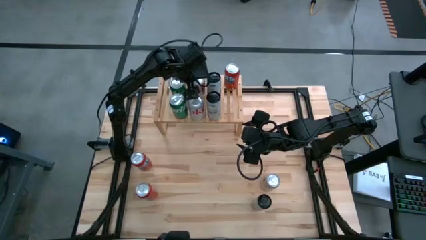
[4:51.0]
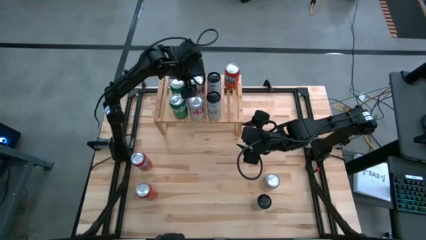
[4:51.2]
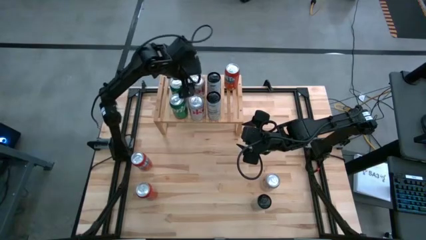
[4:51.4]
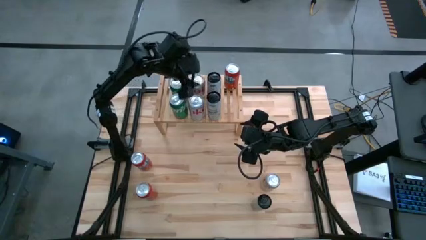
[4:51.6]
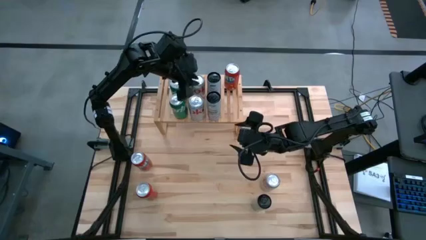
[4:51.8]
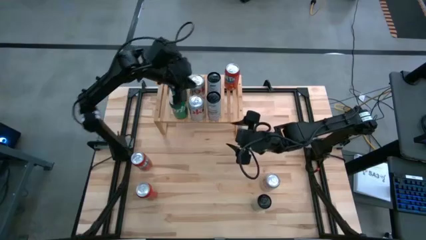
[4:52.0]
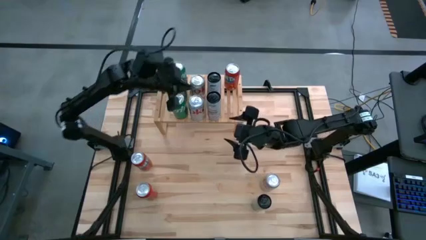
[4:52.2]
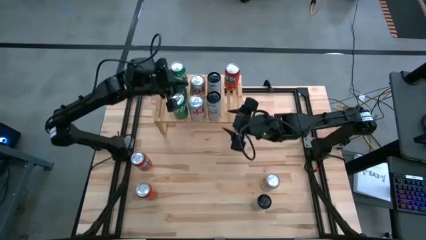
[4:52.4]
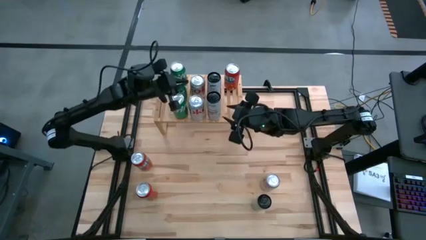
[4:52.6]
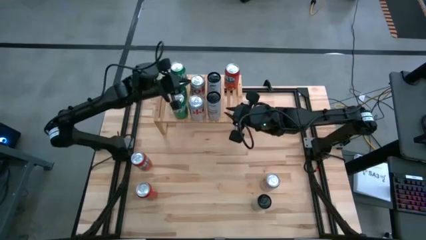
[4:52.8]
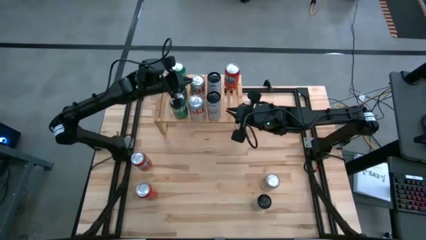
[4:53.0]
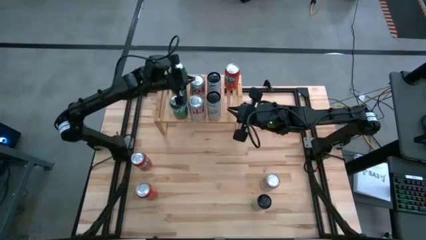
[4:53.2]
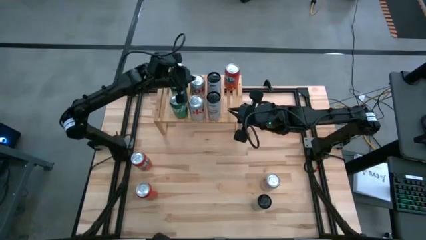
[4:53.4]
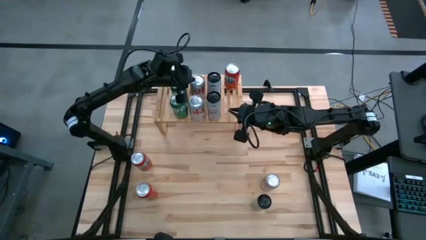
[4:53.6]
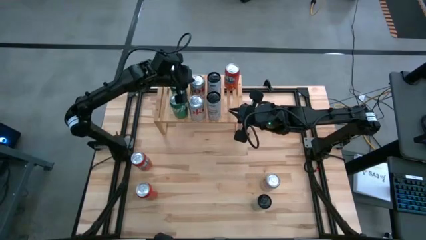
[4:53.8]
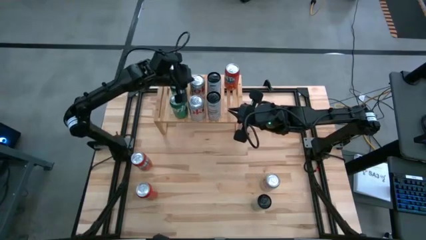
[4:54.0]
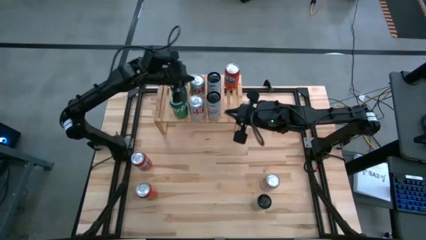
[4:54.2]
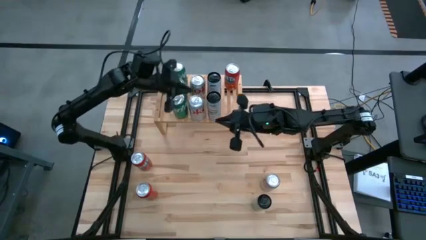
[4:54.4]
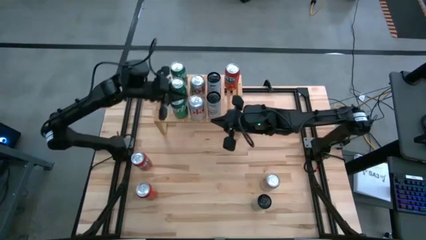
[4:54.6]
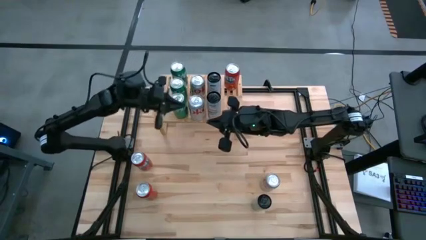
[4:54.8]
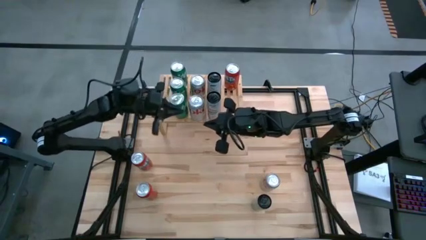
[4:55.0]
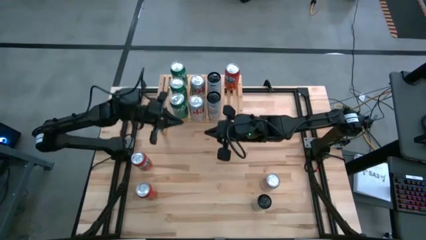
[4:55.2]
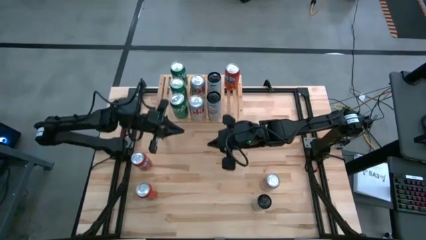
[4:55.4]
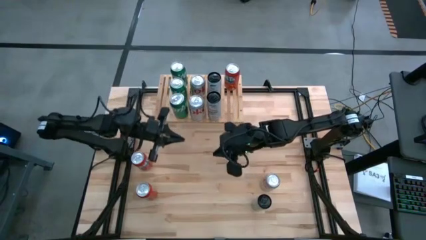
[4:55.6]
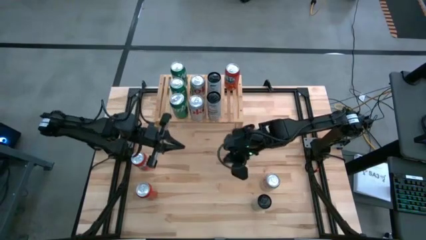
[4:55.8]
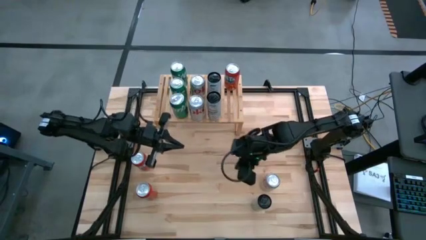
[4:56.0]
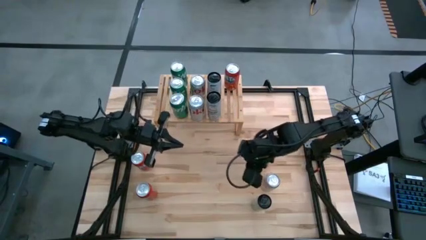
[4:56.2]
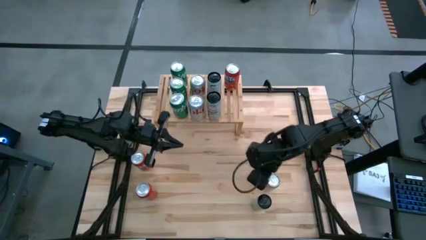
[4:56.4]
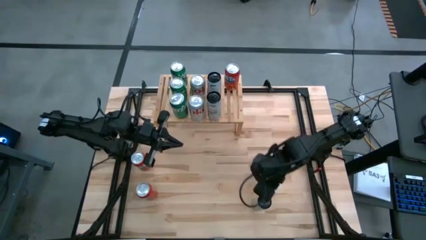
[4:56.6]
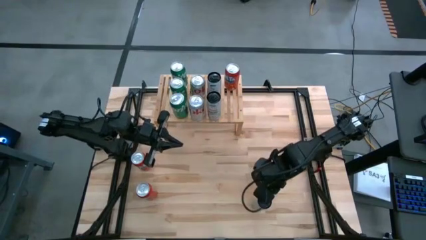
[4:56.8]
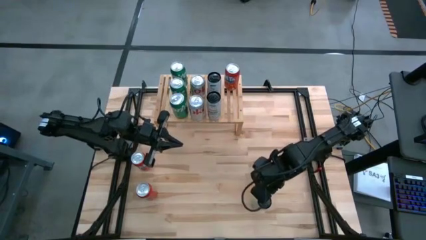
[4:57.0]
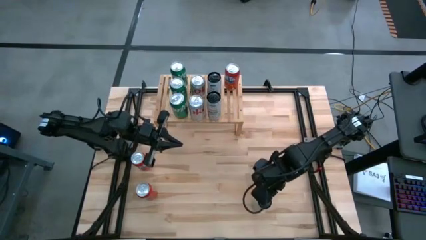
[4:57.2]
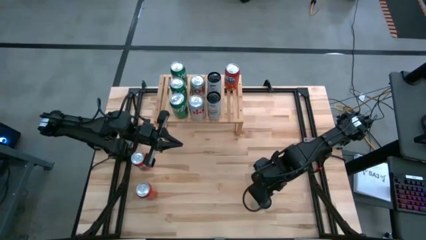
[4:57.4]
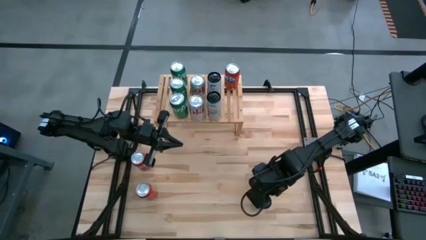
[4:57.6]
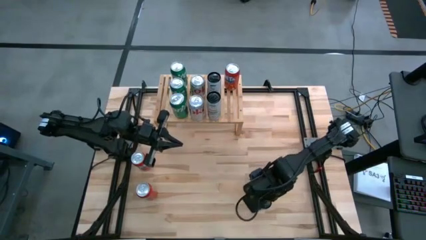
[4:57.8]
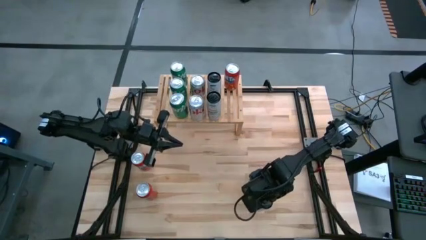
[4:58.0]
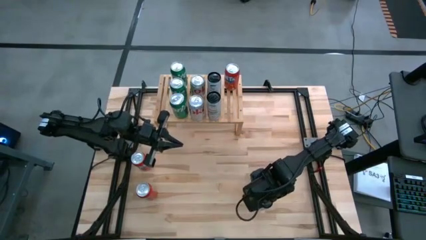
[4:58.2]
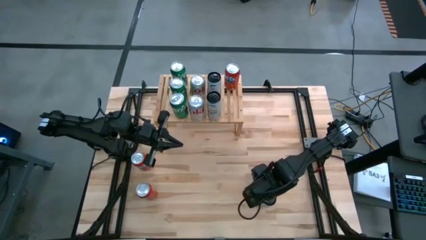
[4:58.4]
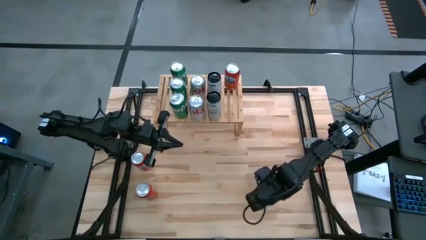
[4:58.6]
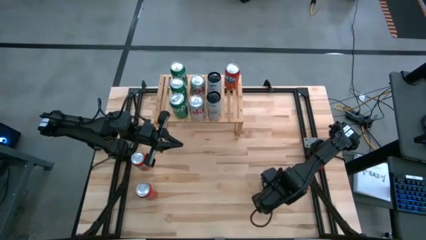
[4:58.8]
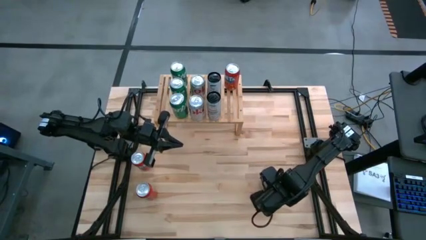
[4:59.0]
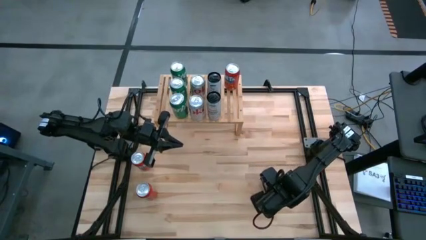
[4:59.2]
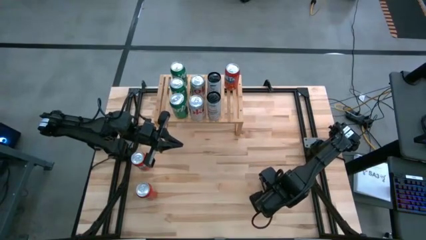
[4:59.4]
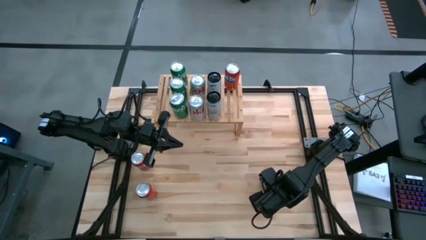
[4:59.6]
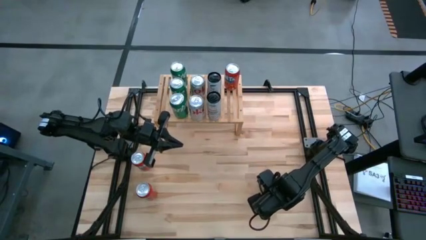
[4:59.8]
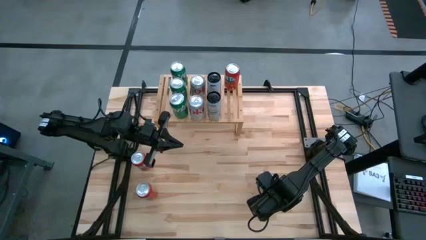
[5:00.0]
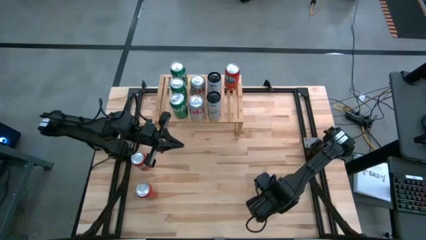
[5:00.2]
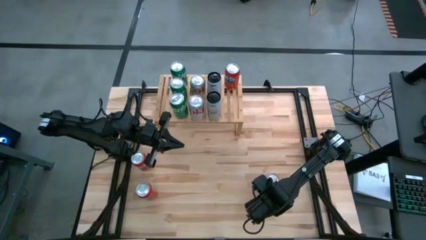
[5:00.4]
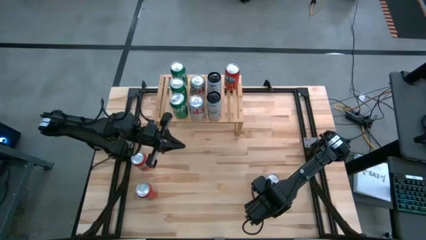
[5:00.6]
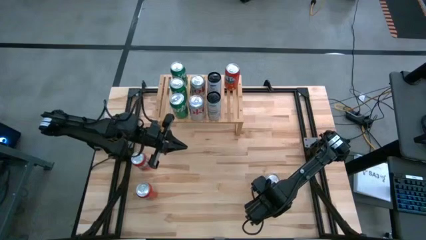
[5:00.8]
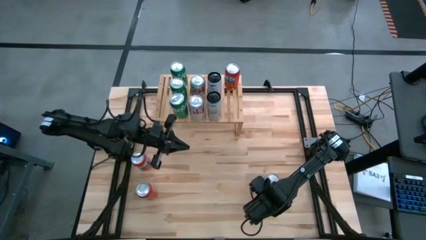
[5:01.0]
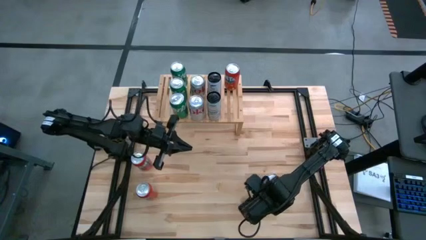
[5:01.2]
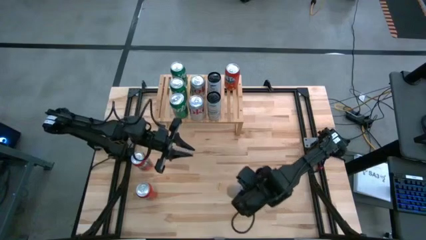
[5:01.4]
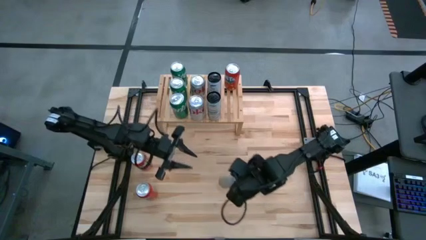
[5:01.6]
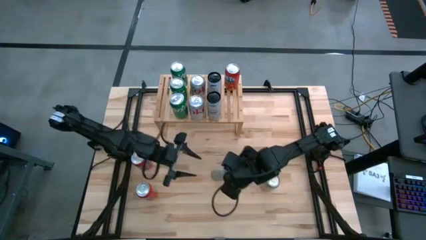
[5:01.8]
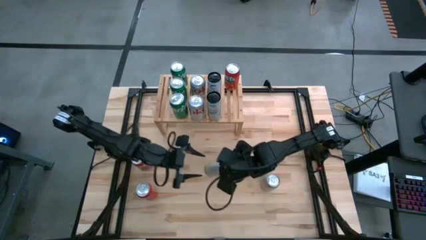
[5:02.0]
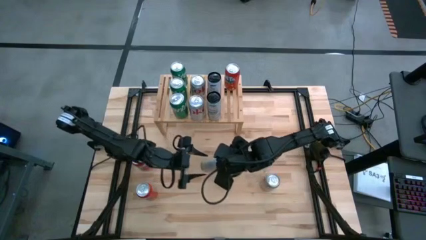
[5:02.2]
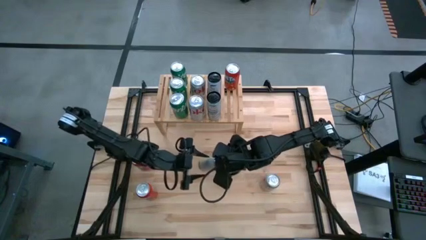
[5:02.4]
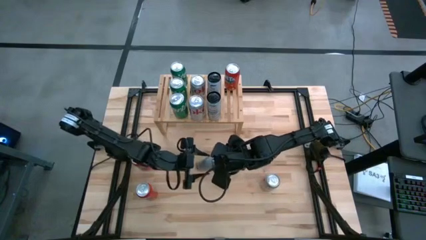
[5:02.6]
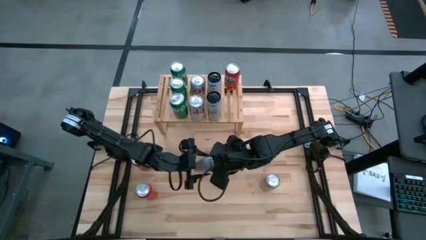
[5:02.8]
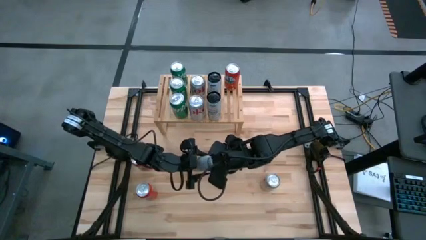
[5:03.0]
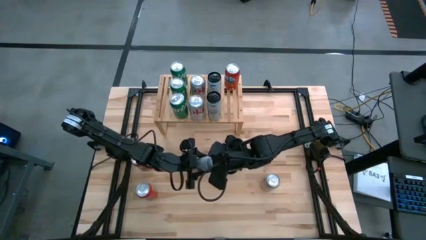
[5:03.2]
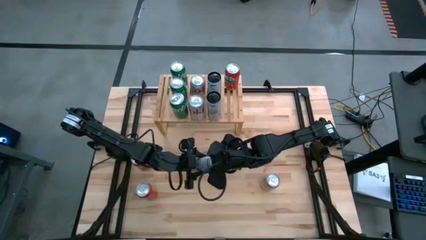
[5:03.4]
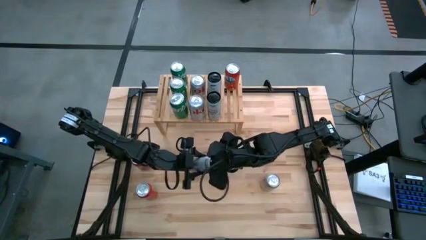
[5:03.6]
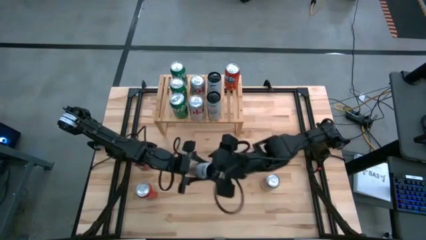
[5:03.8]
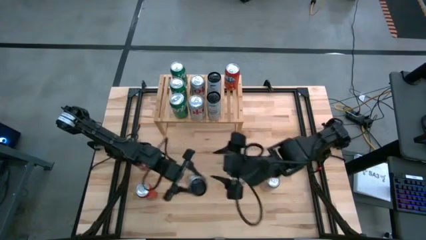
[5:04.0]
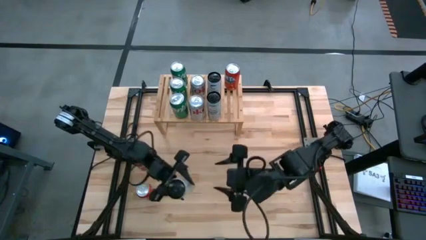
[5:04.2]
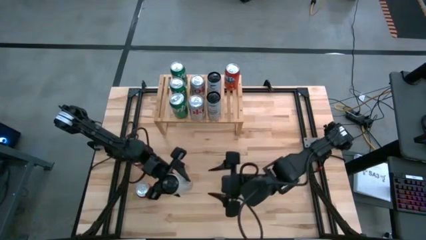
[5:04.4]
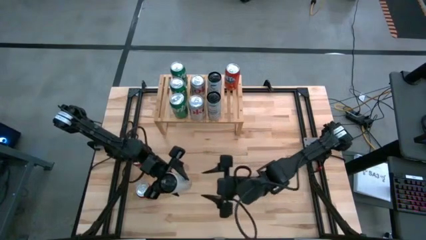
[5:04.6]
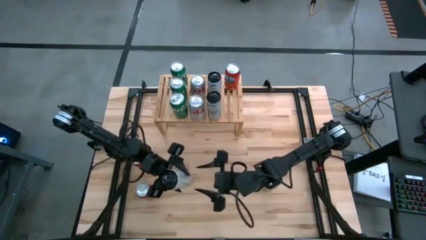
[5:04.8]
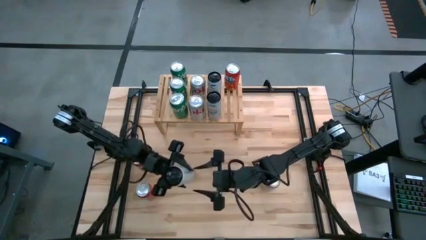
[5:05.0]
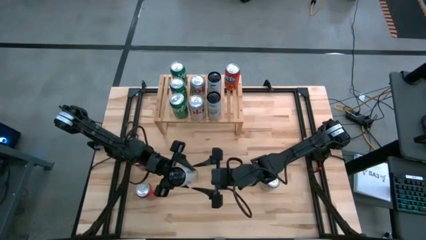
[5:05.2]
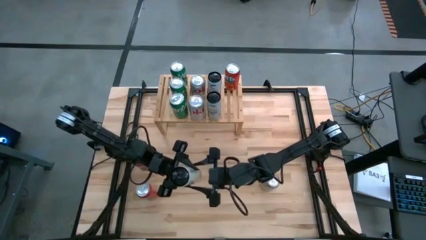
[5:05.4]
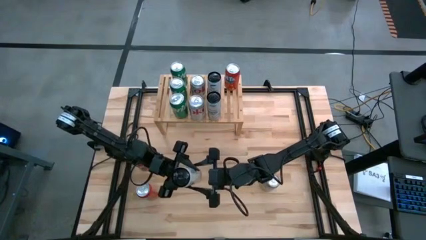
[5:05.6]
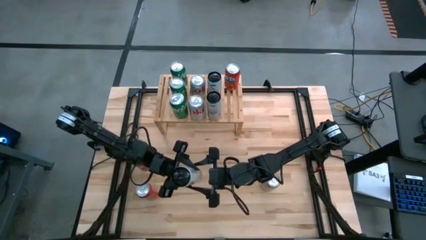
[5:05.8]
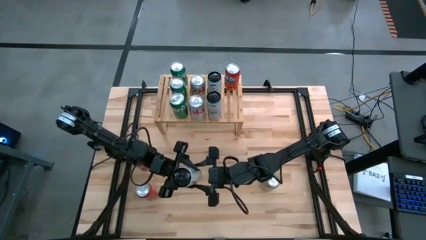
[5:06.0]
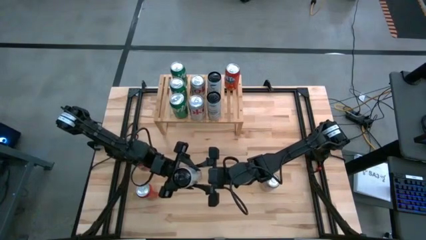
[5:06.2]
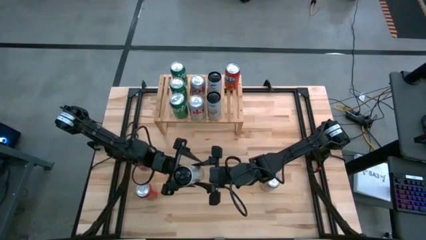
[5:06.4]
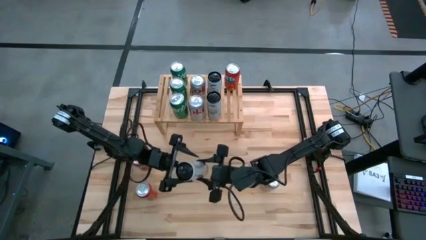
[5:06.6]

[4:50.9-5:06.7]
Task: Place canned beverage on shelf
Put the yellow soda can on the shelf

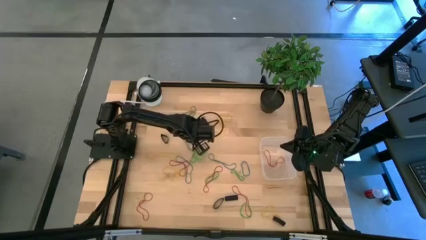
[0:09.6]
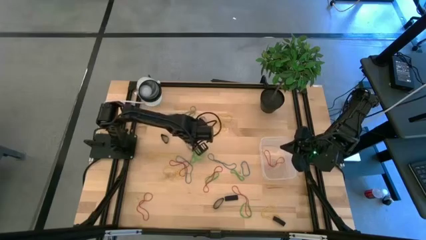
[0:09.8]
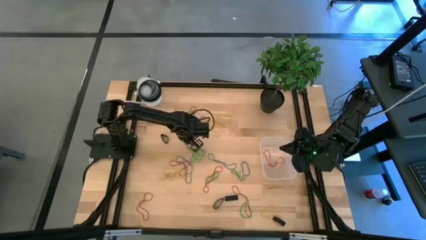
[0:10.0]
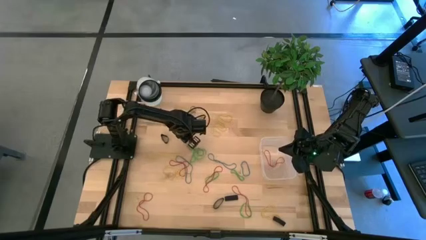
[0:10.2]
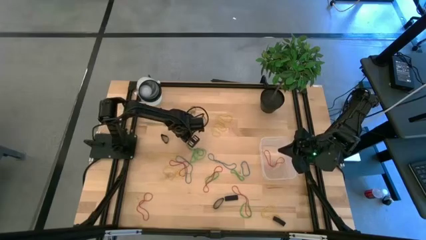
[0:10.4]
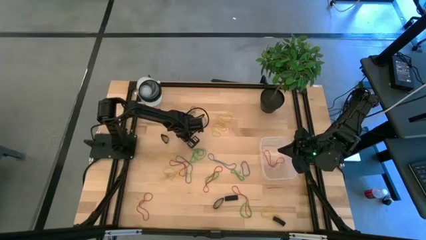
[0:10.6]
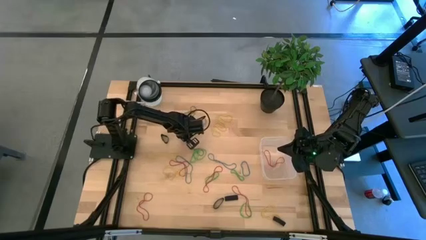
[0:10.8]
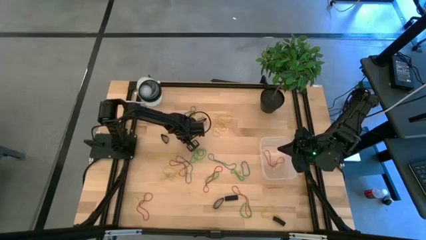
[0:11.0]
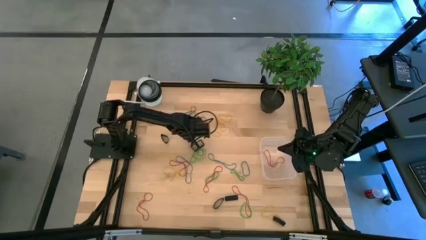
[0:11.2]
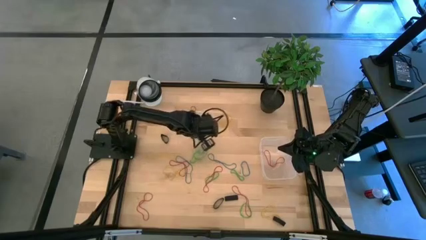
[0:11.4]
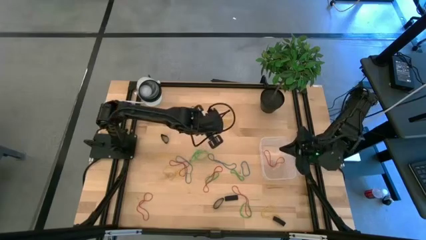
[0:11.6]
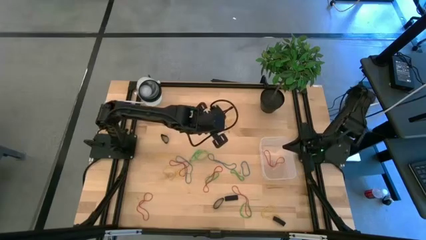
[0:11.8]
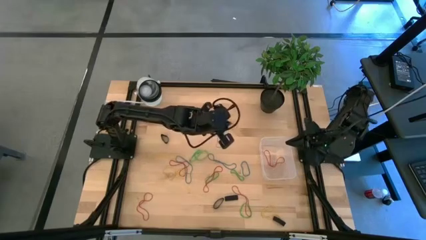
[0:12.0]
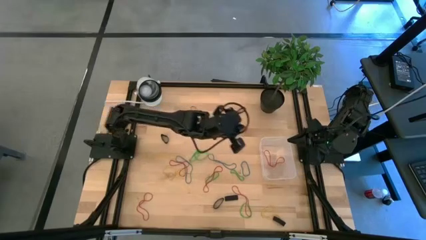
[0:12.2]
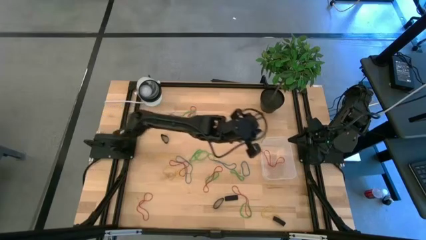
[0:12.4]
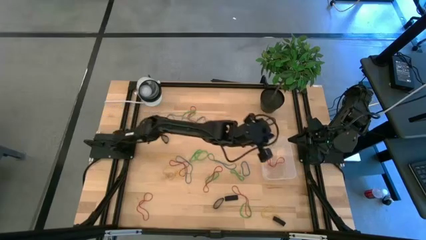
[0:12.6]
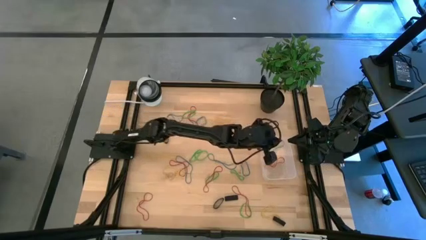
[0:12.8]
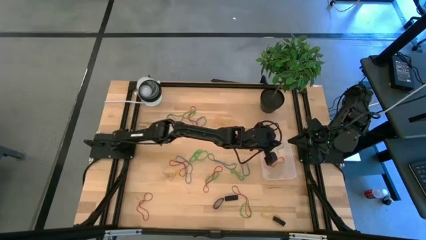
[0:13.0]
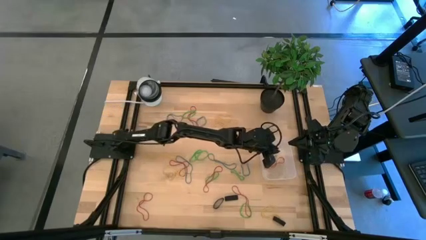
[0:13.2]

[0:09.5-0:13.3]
Task: Pick and place rubber bands into bin
Put the blue rubber band into the transparent bin
